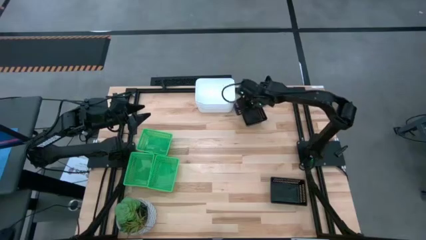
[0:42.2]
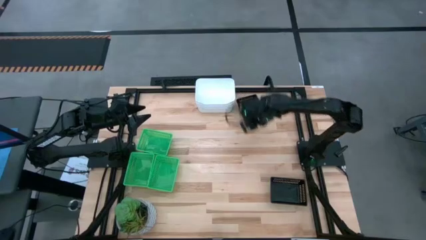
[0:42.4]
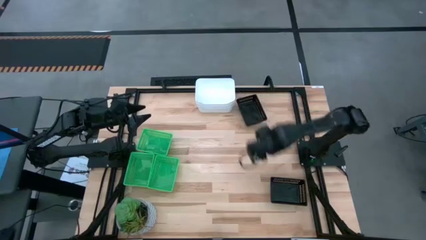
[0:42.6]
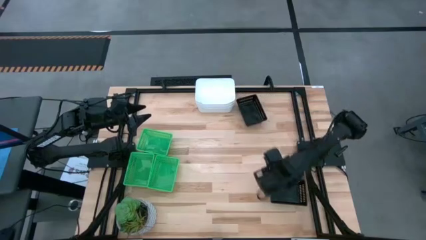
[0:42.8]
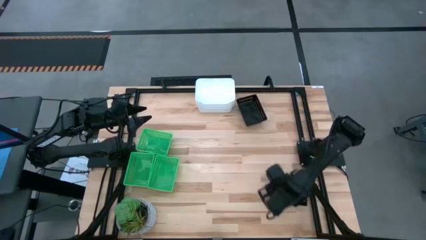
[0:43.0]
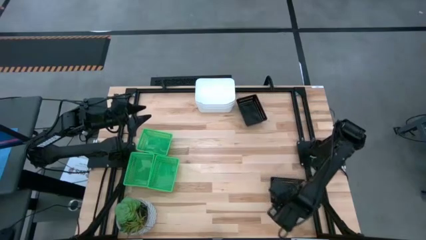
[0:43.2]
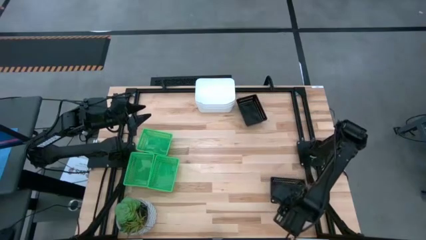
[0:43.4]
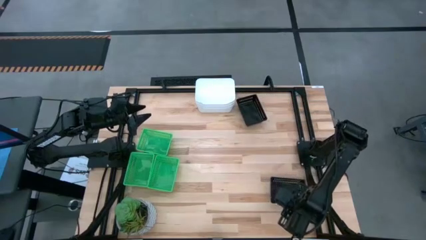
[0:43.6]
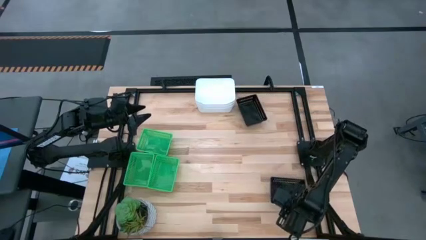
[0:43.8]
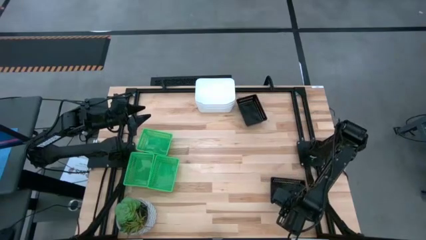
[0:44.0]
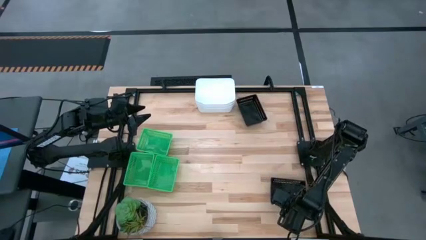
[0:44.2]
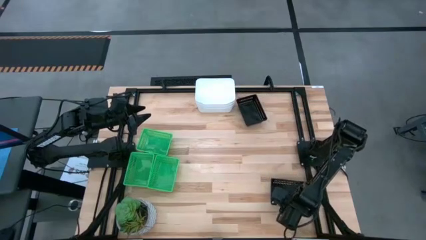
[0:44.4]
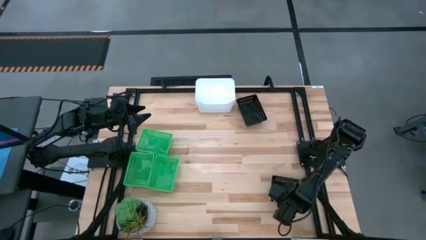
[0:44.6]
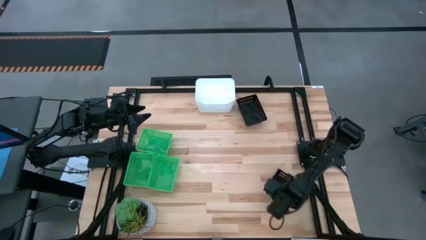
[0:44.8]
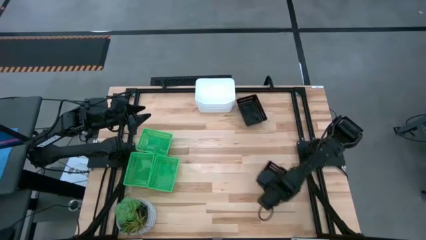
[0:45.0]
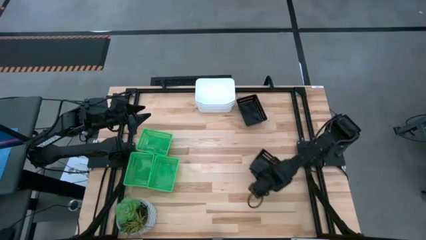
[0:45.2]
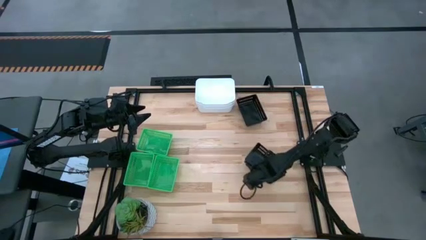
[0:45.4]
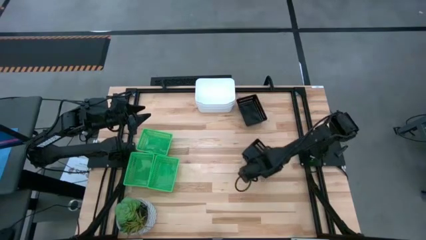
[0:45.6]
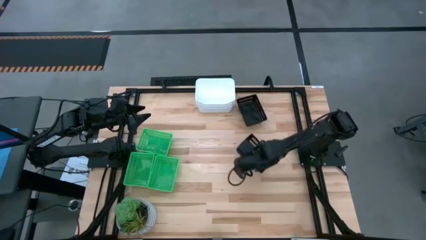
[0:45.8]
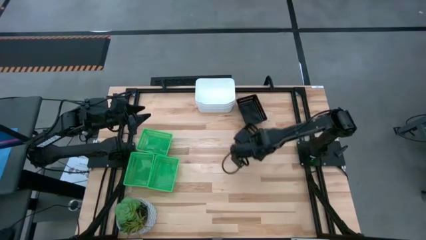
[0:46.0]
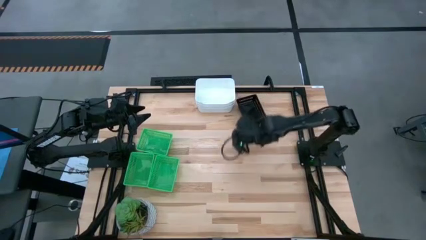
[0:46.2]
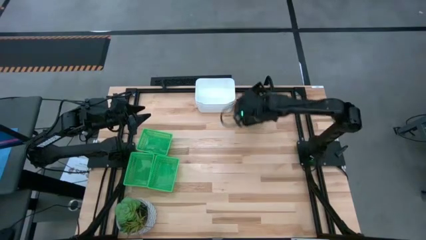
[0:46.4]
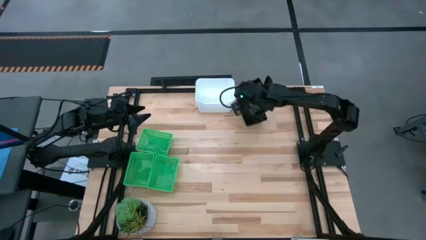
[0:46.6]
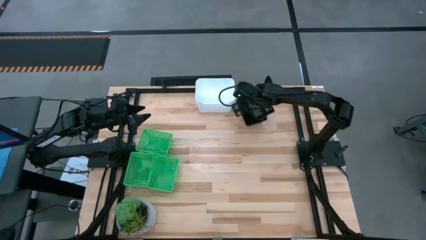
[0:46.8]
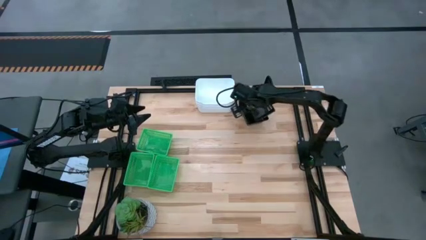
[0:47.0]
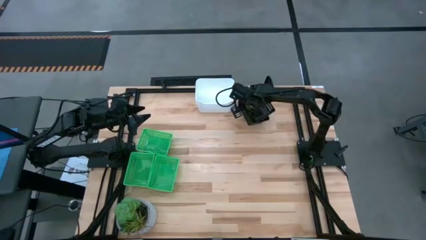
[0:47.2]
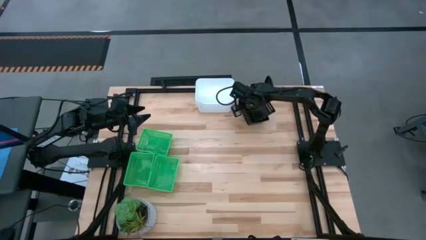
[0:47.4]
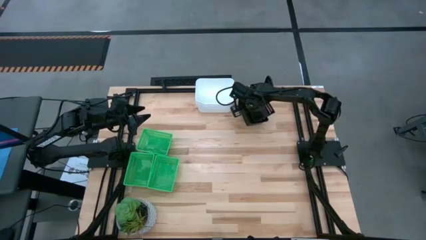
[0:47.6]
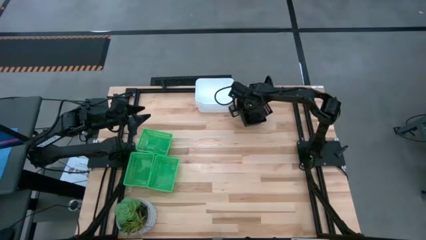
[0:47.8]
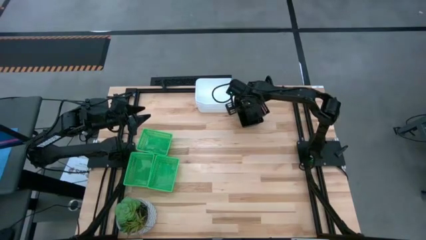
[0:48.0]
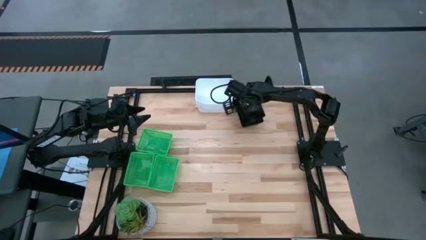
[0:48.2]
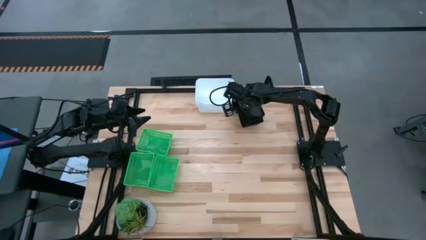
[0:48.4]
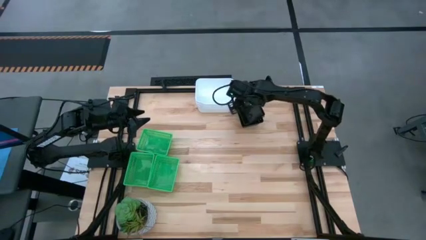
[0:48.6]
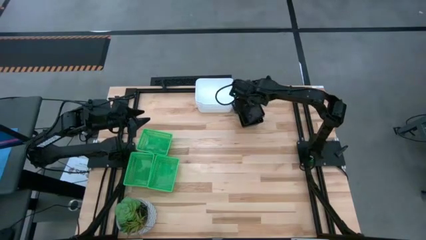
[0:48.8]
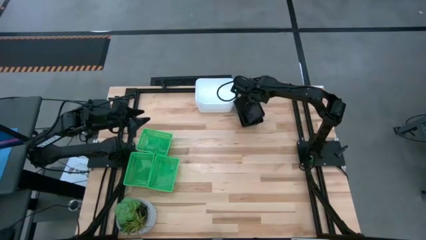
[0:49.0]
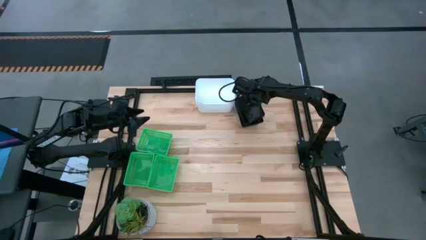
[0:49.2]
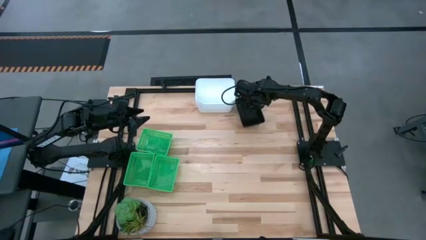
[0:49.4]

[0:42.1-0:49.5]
Stack the bottom black bin into the top black bin

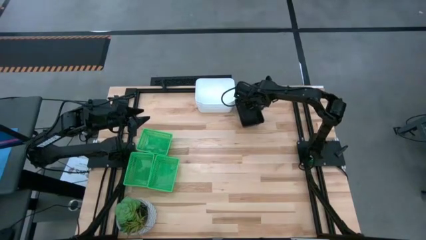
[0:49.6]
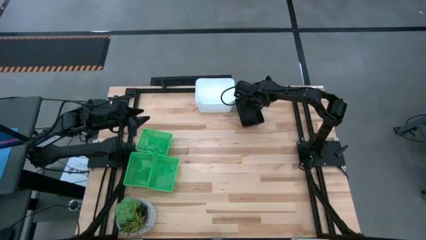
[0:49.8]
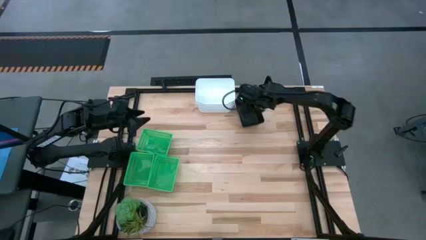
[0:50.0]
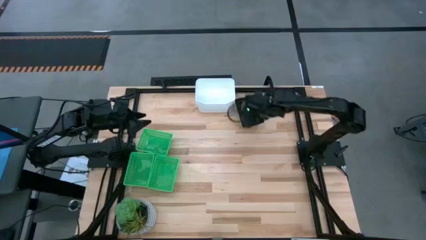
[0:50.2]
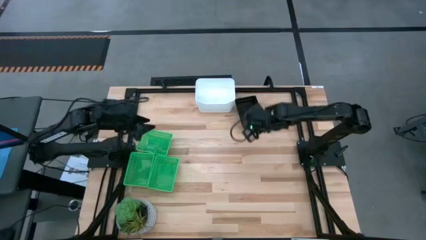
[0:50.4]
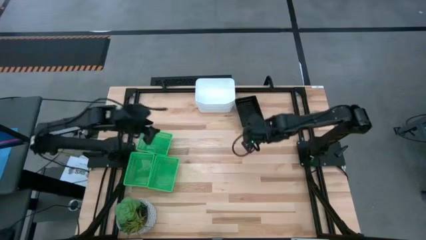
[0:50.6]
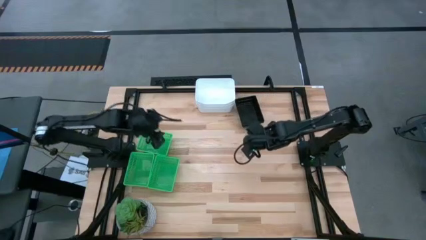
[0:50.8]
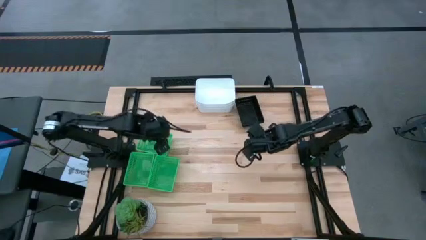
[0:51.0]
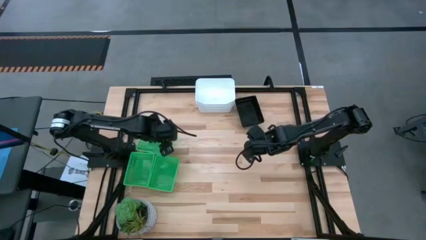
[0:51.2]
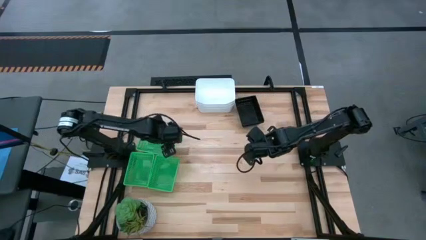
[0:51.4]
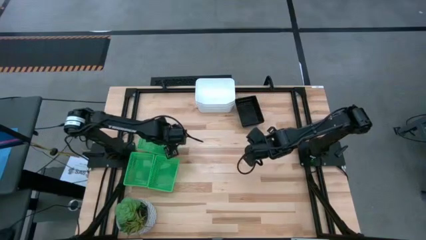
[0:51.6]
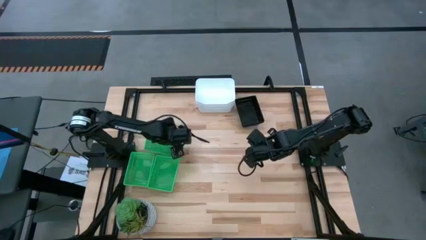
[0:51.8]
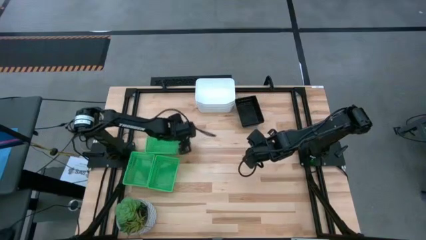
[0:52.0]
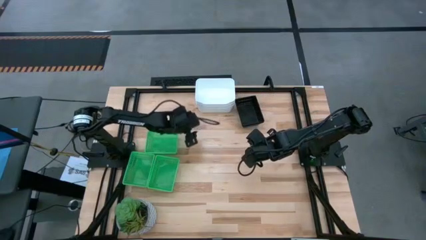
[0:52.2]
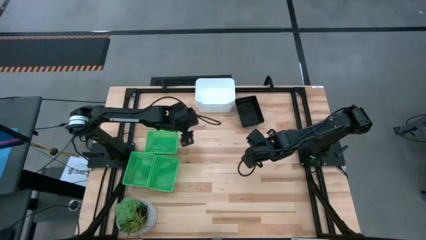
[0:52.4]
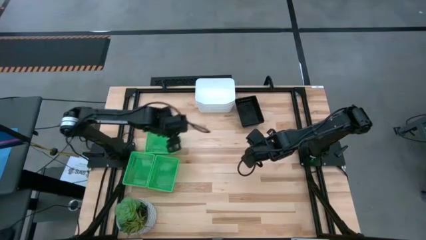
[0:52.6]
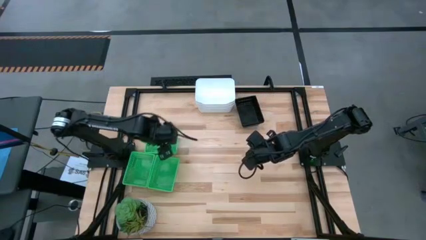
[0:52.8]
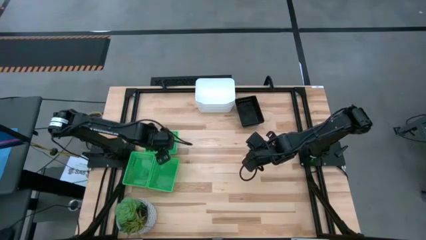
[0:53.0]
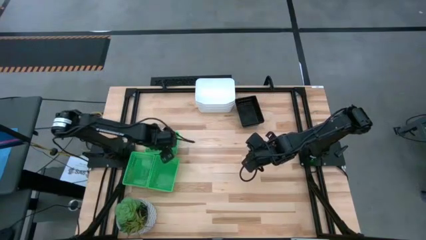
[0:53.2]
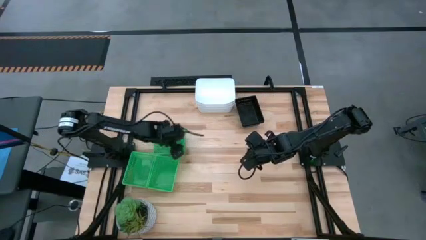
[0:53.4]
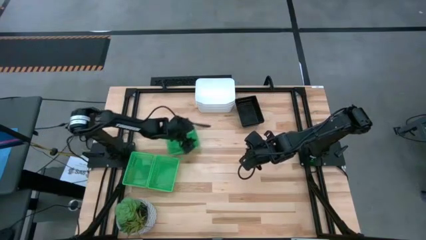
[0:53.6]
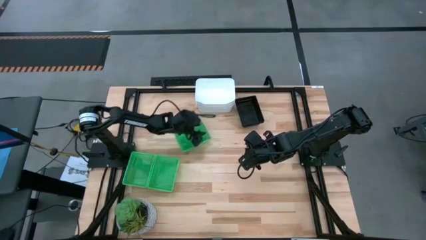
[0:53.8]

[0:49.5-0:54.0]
Move the top green bin to the center of the table

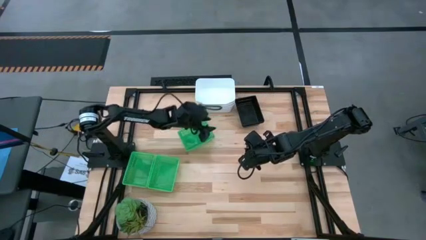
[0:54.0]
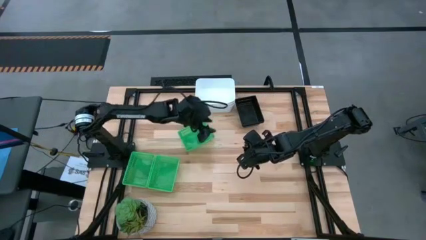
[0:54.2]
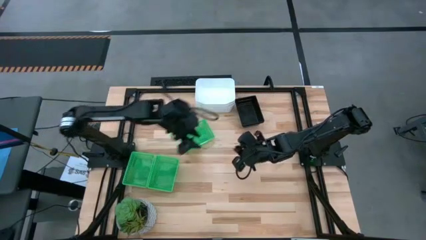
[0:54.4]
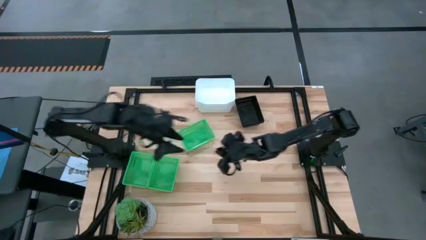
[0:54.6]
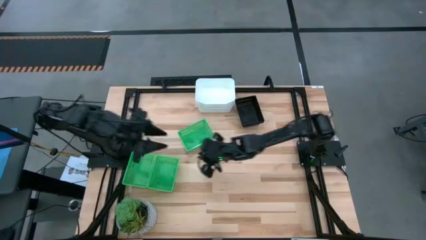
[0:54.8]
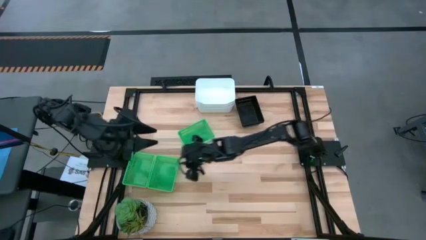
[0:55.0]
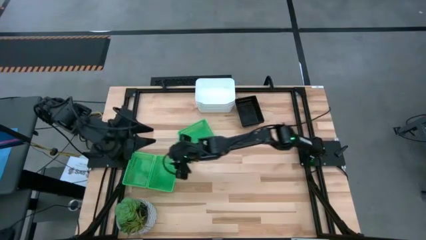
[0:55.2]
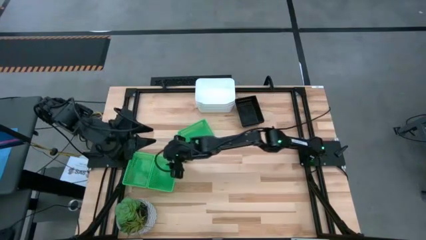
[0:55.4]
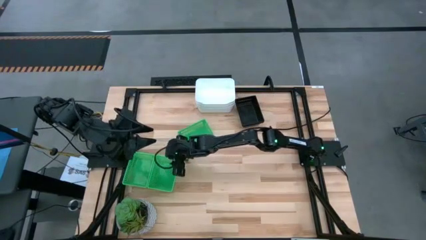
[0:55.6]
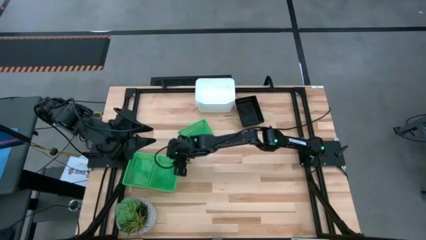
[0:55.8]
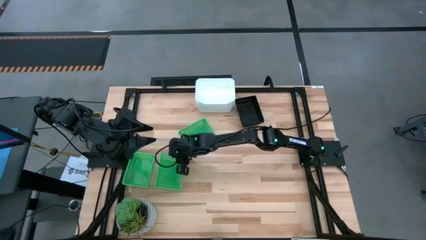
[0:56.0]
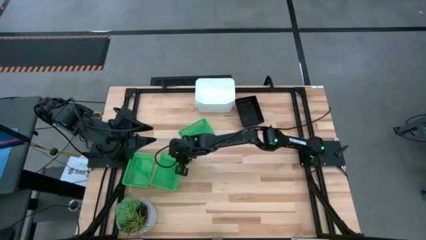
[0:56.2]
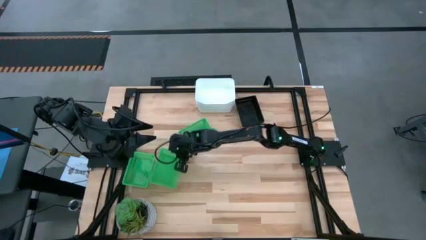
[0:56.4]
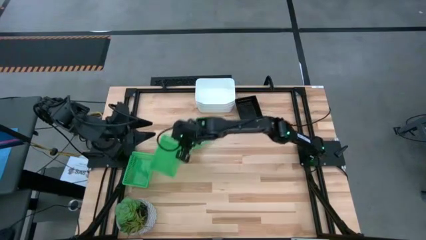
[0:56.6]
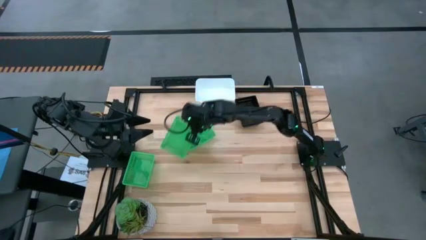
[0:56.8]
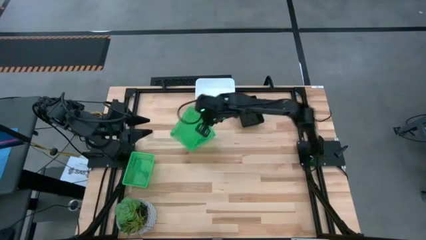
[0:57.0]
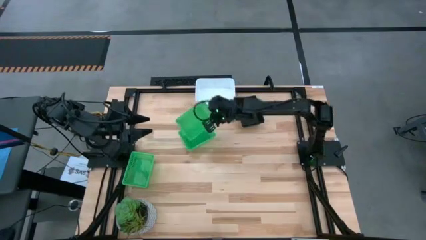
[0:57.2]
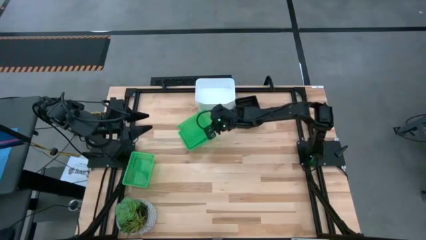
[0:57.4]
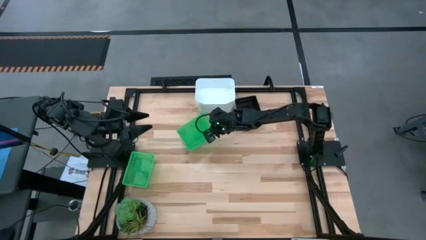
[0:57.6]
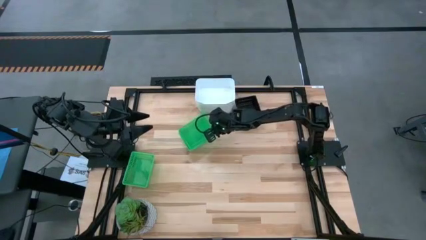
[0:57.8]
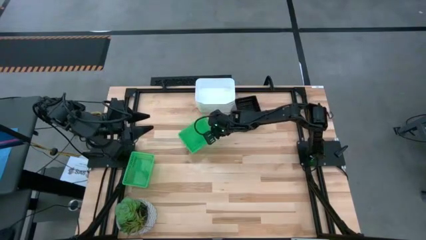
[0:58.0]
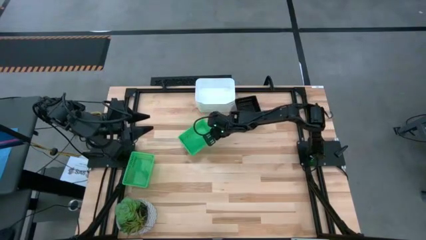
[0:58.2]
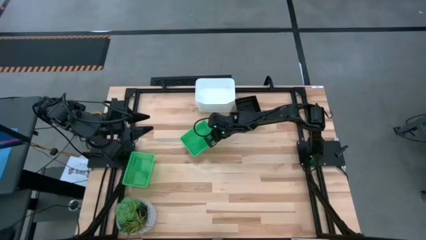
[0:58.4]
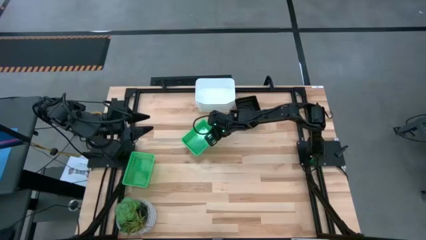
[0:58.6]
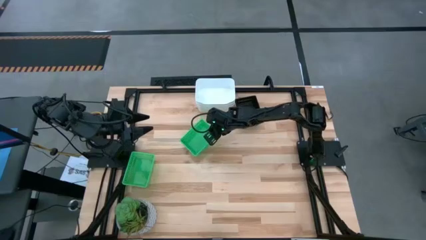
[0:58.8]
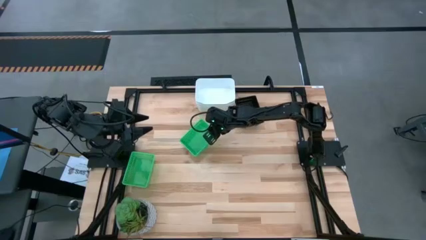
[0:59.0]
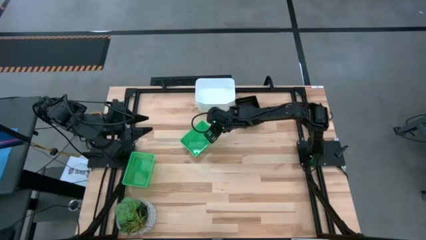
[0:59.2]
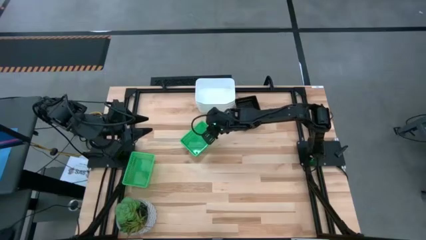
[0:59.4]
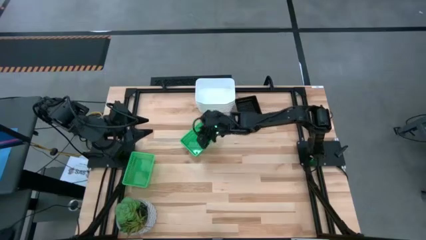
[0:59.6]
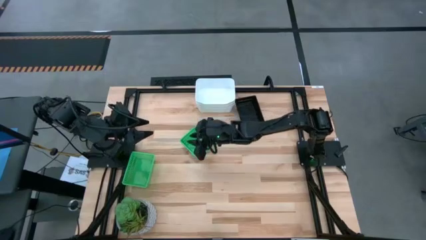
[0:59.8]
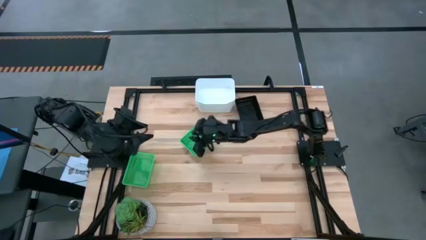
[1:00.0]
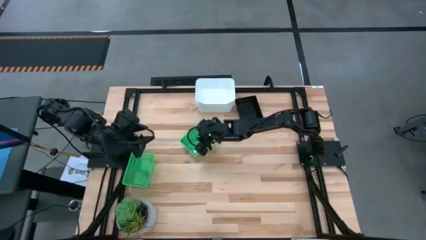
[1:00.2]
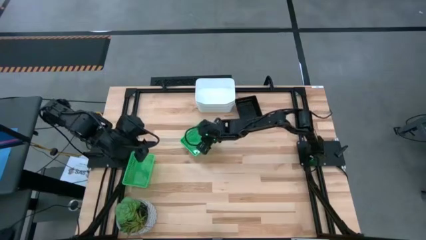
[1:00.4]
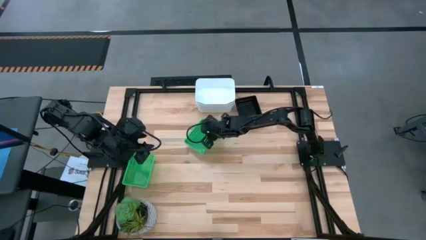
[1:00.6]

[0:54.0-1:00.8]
Stack the bottom right green bin into the top green bin
